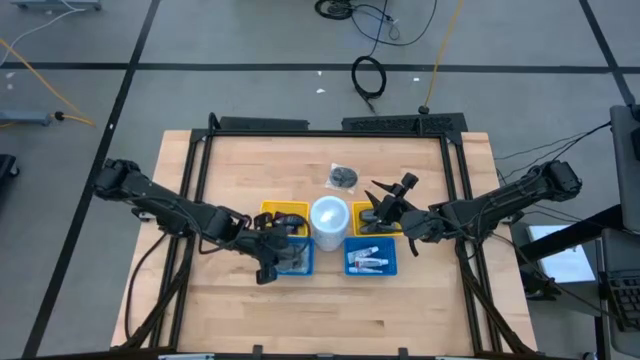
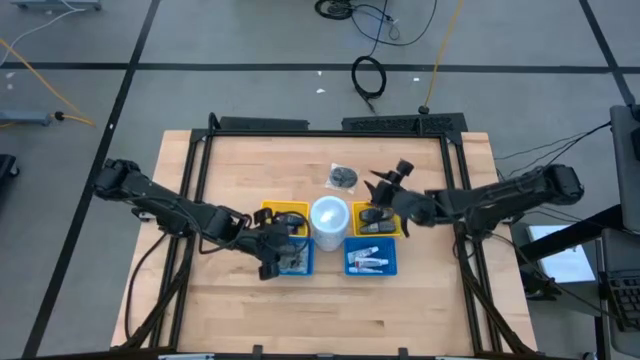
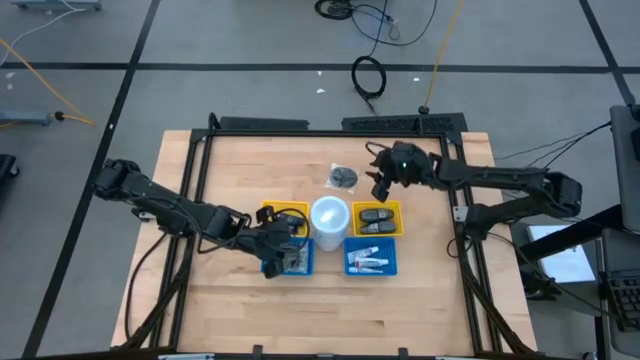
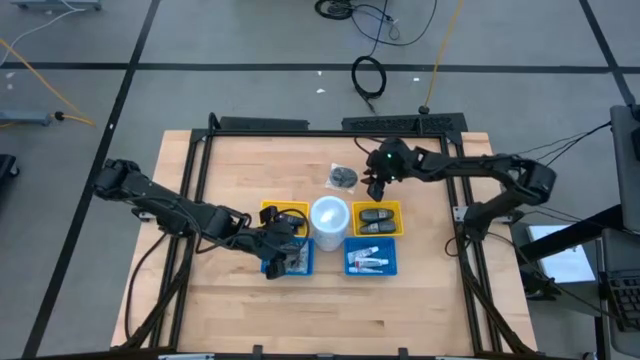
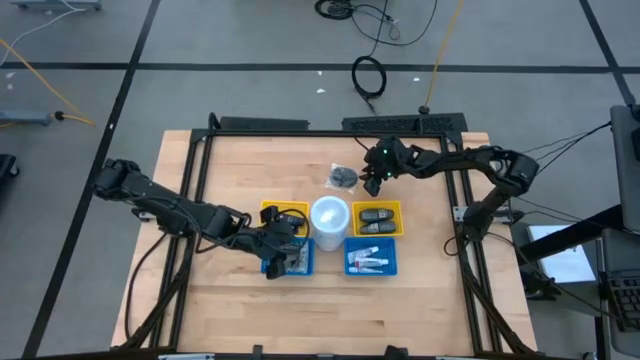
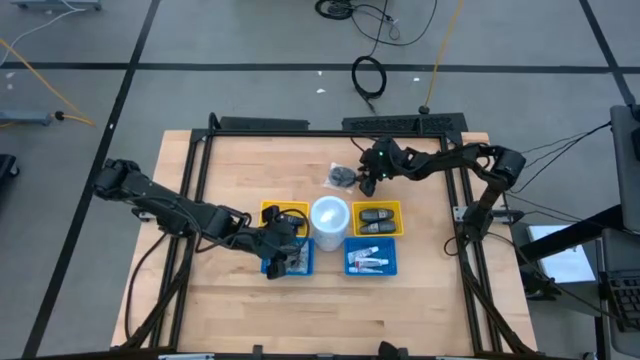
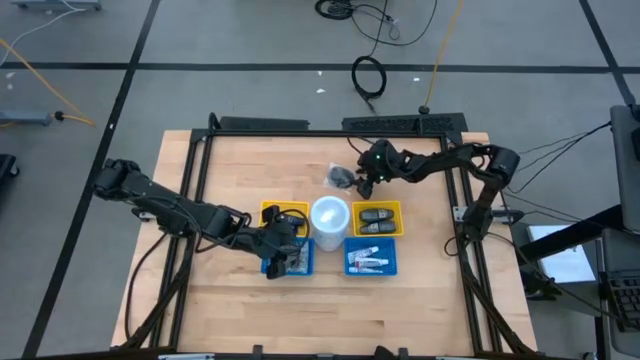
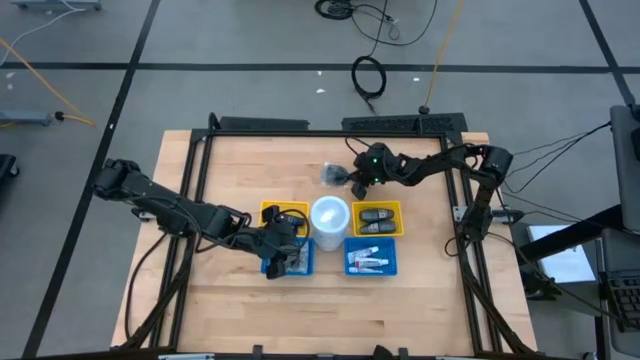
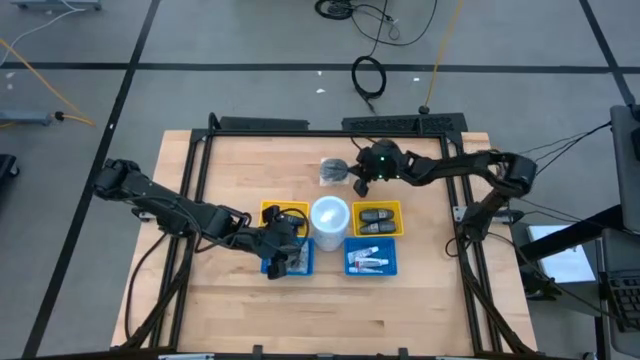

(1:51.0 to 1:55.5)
Task: Pick & Place Travel size toiletries
Put the hairbrush into the left blue bin

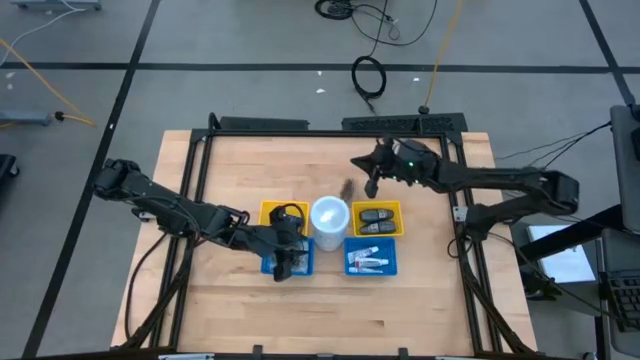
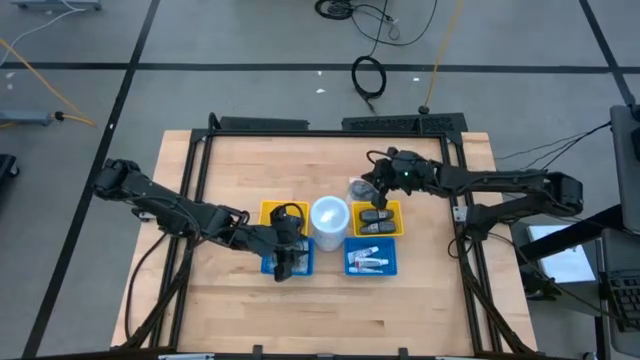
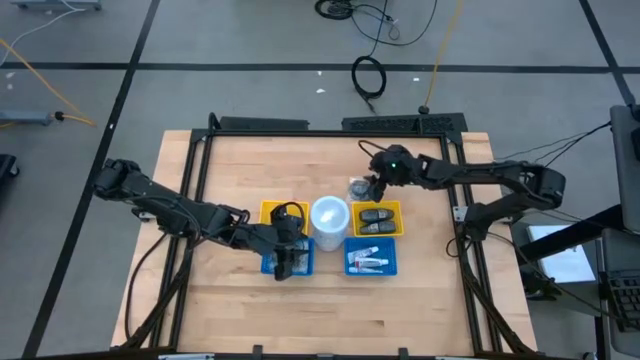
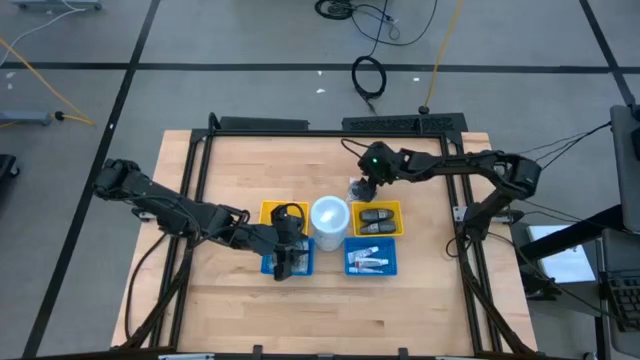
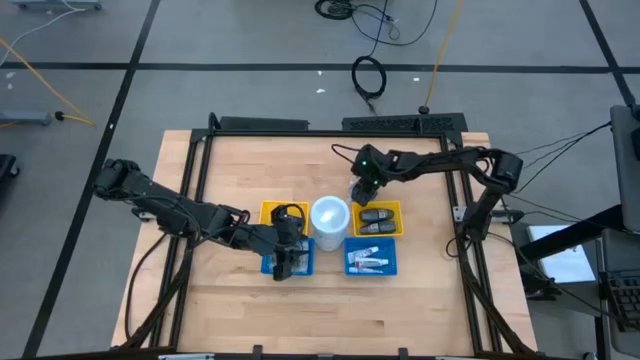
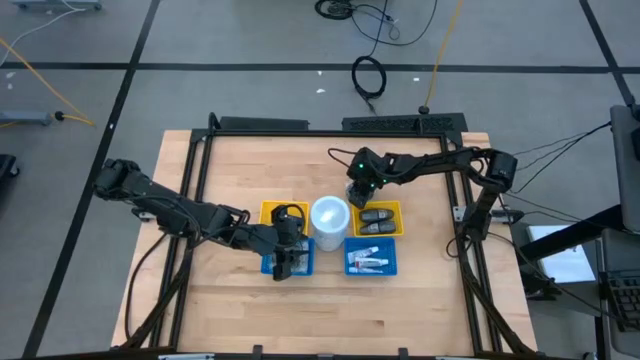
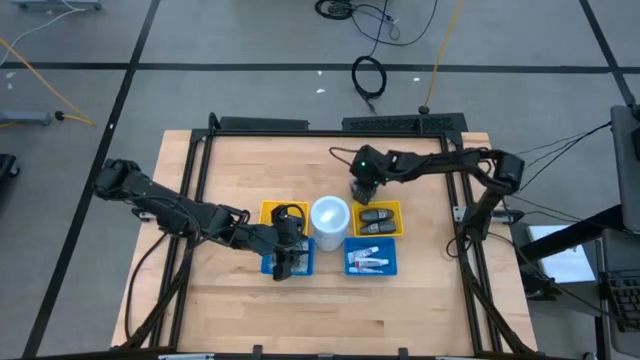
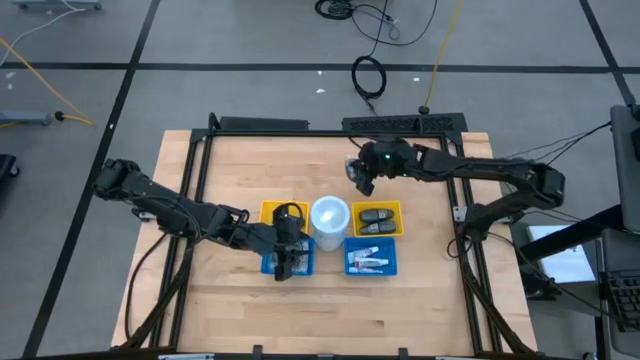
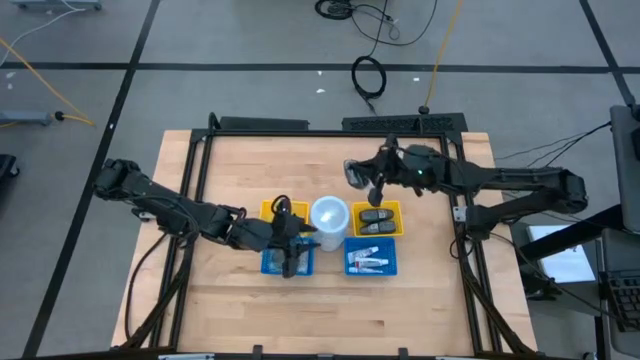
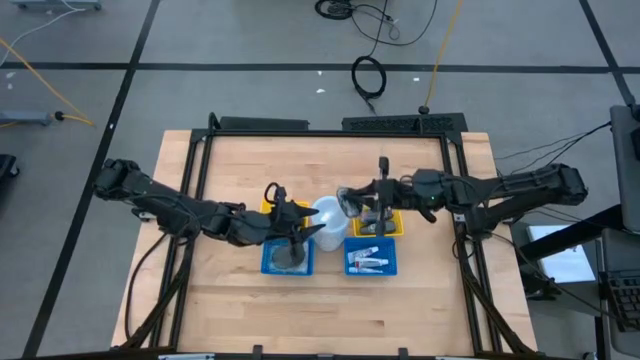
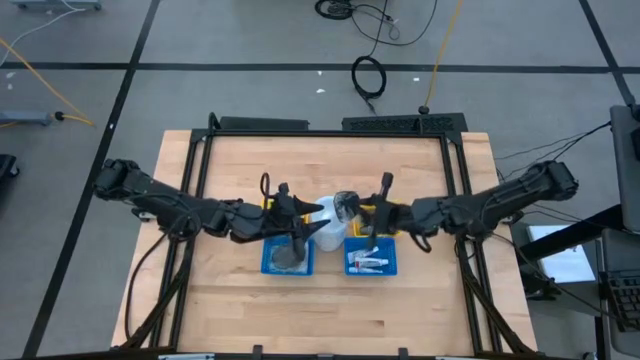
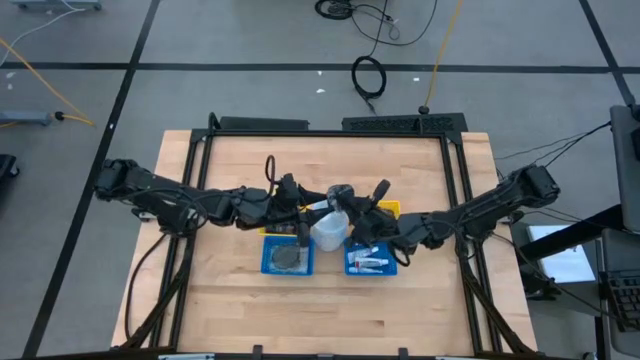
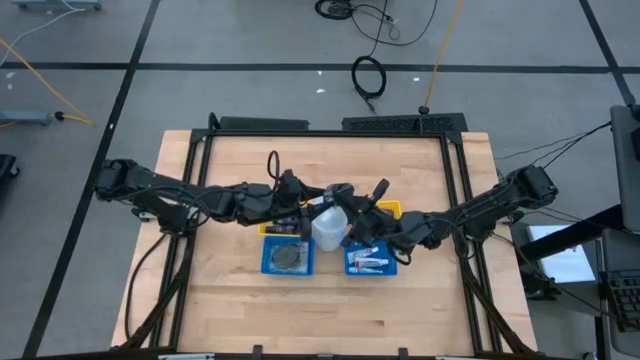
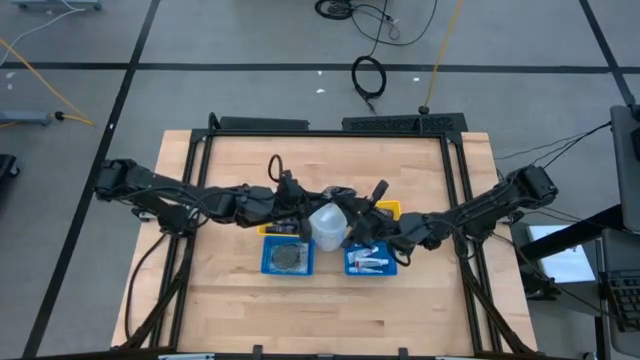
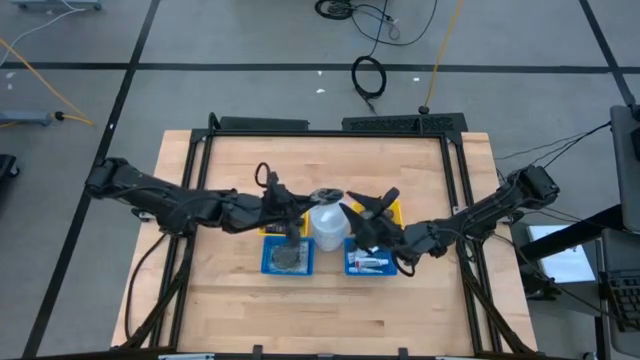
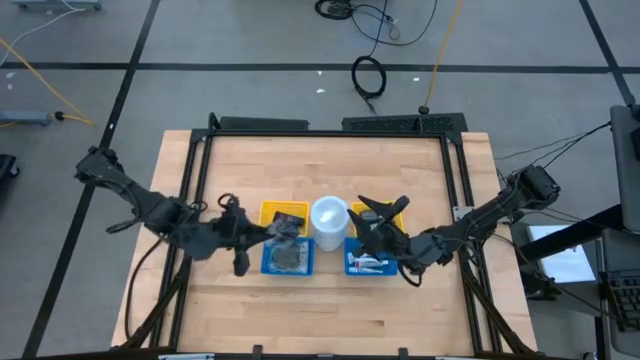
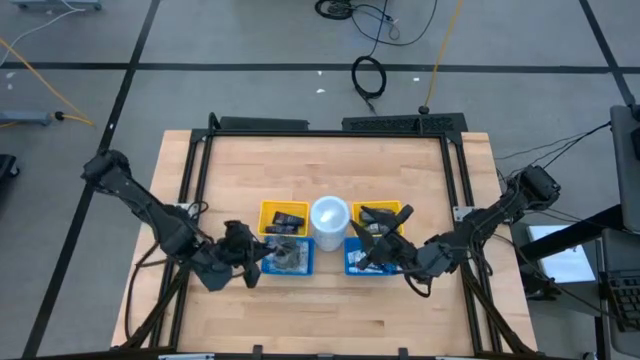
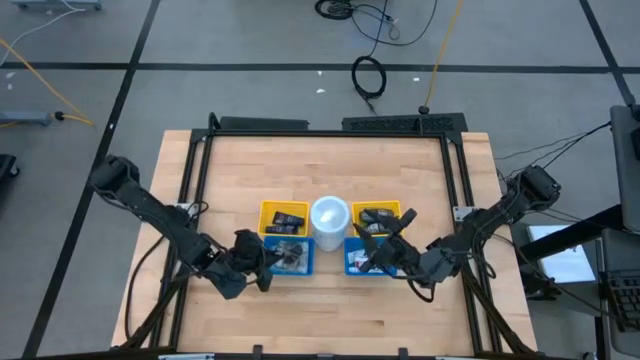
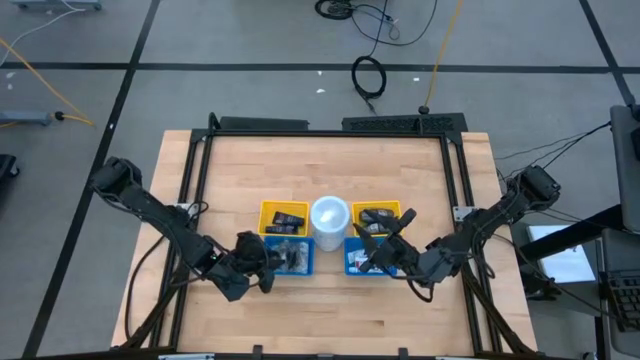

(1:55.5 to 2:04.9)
Put the hairbrush into the left blue bin

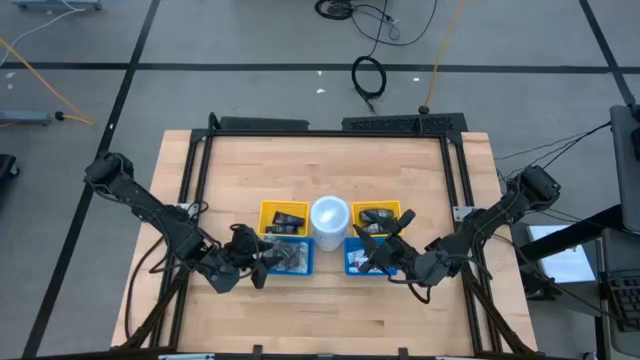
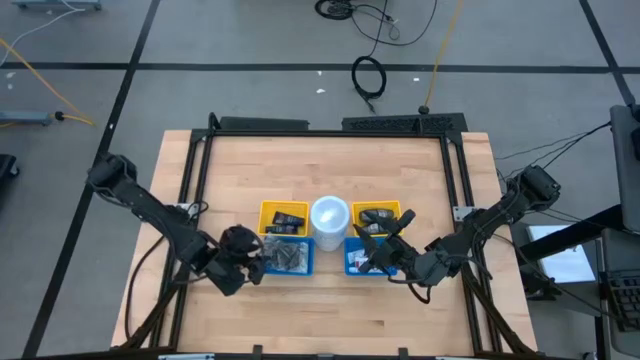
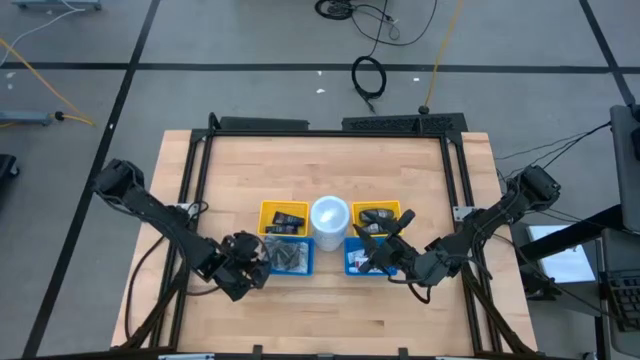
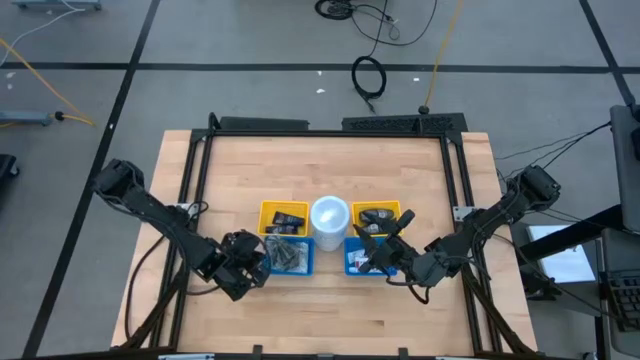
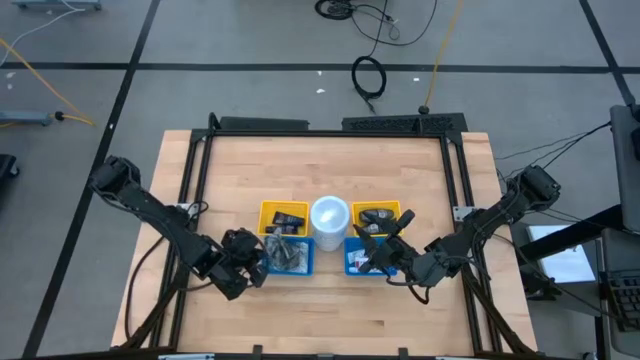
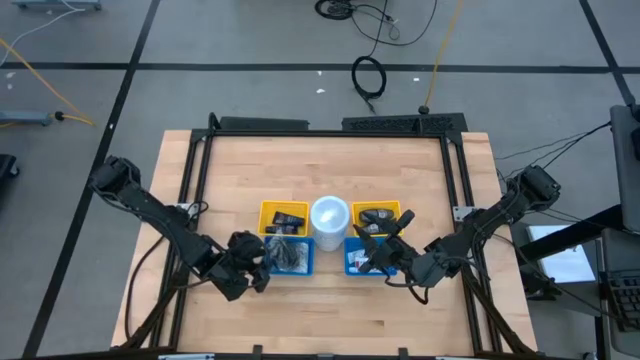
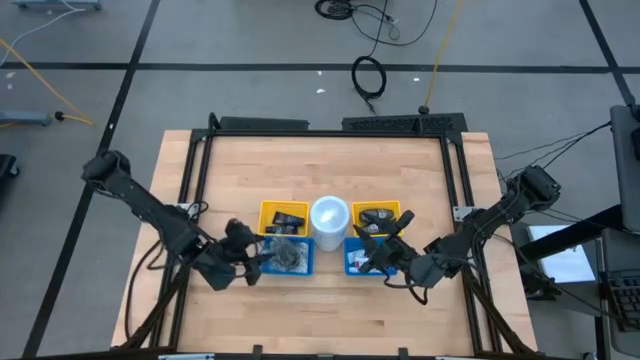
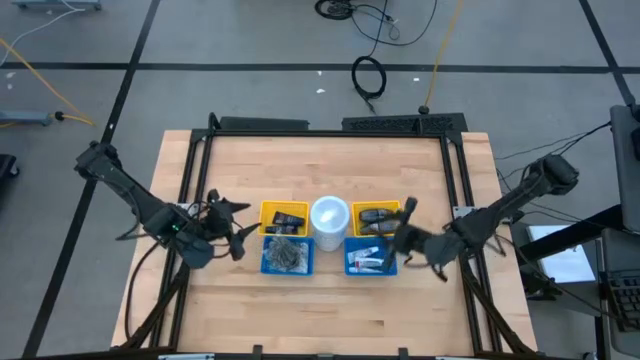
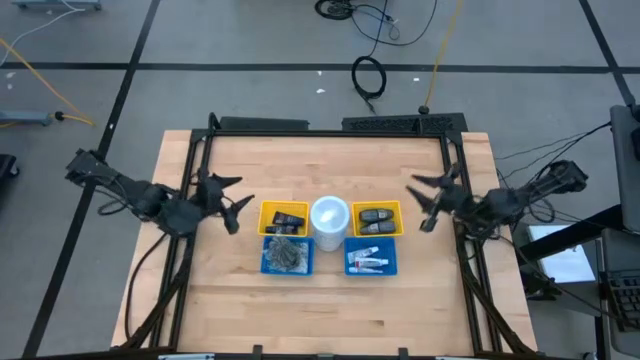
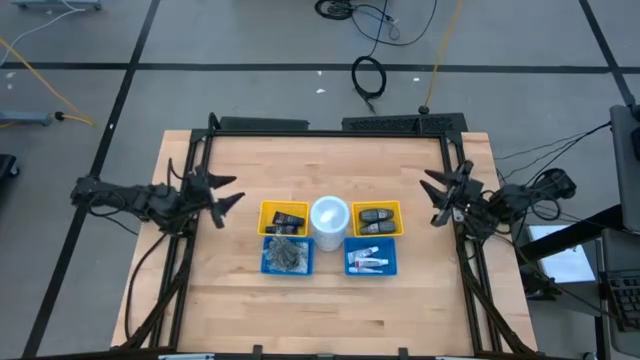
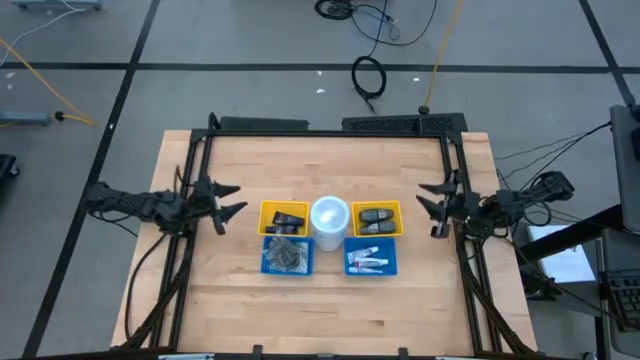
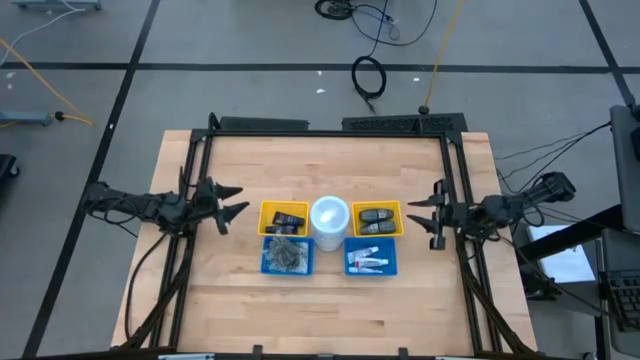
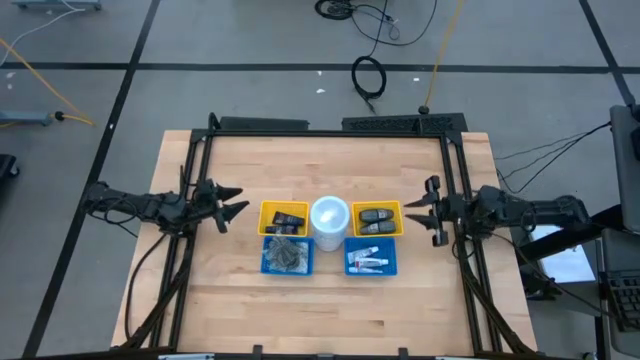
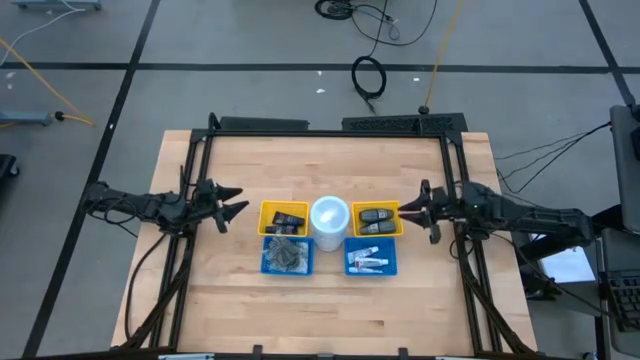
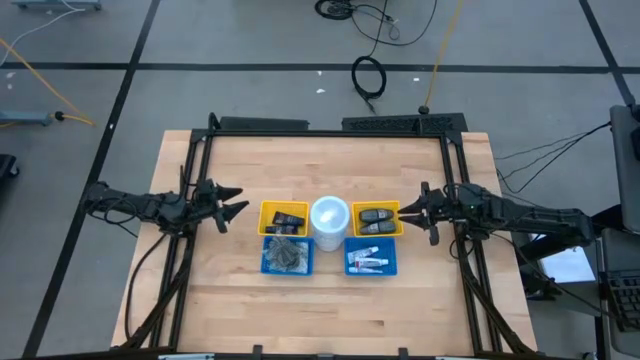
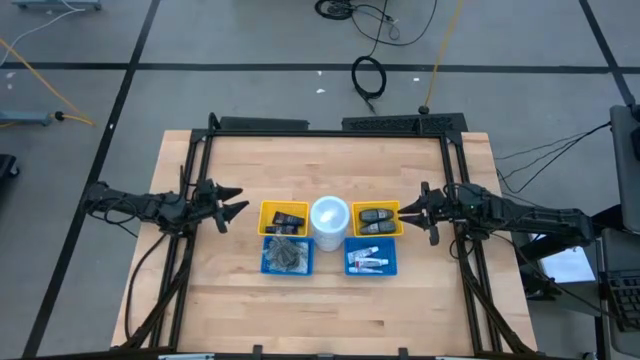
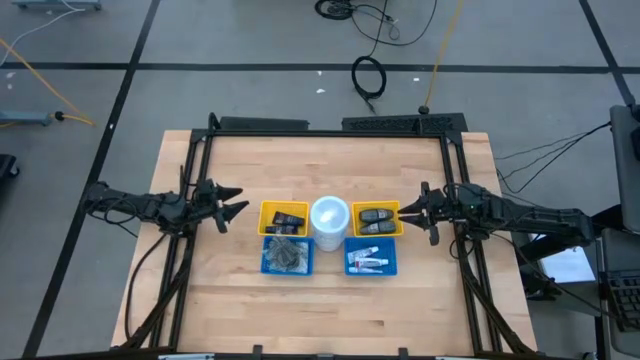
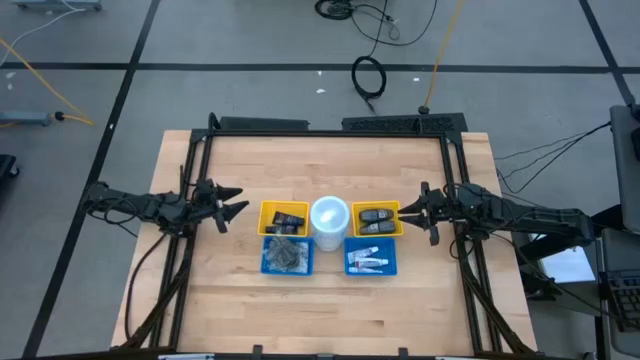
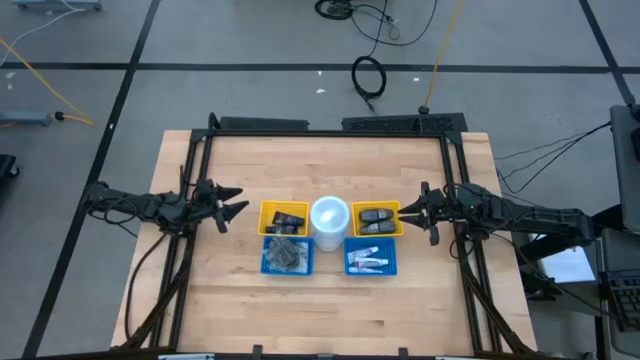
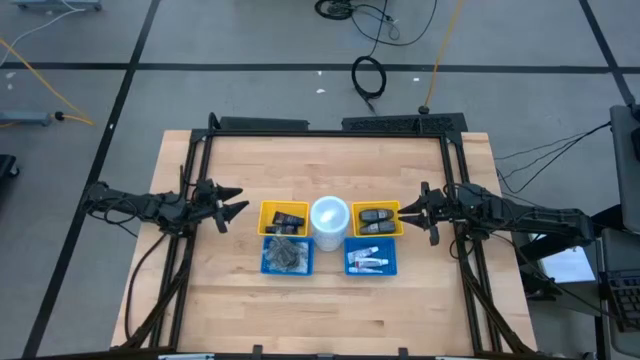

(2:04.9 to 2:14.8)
Return to Home Position
